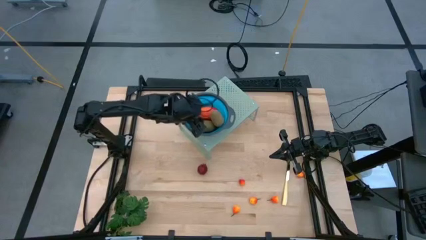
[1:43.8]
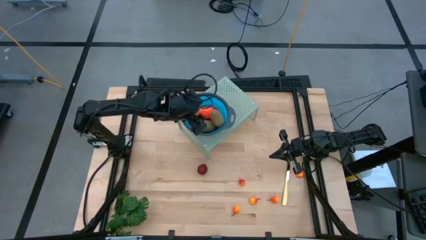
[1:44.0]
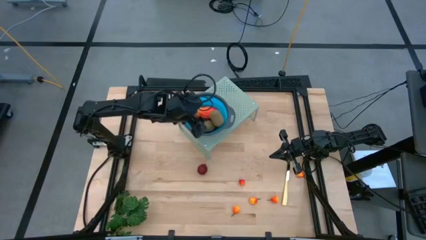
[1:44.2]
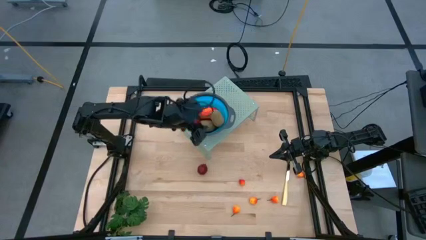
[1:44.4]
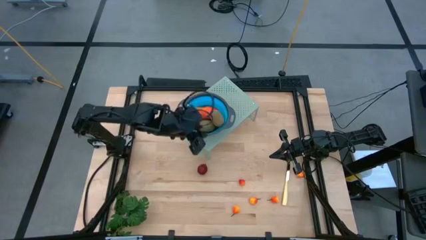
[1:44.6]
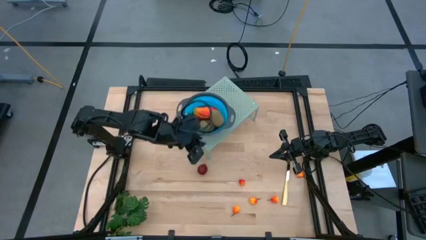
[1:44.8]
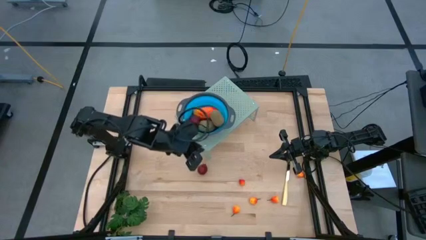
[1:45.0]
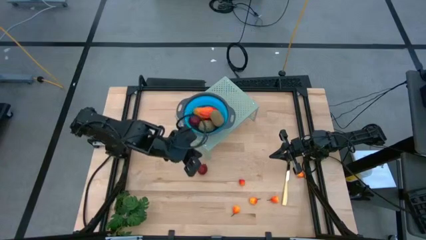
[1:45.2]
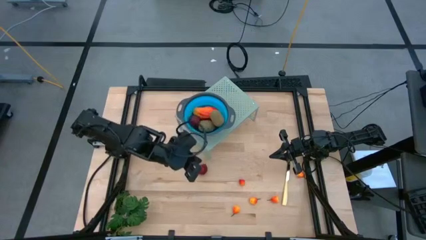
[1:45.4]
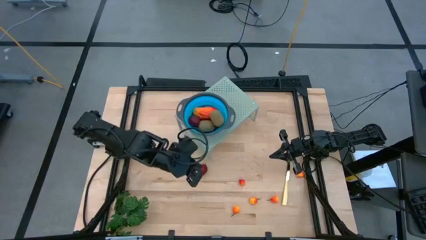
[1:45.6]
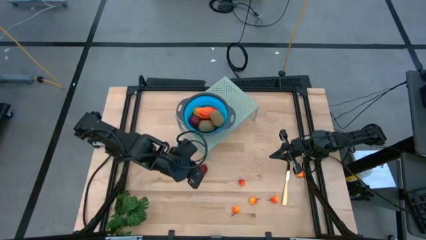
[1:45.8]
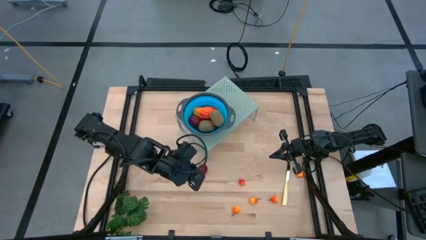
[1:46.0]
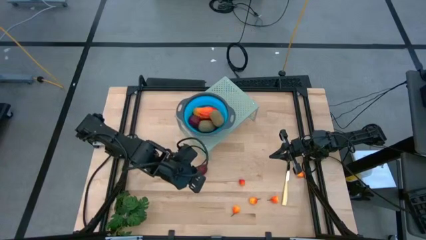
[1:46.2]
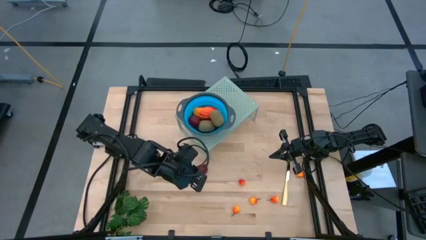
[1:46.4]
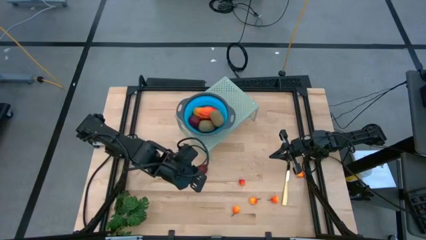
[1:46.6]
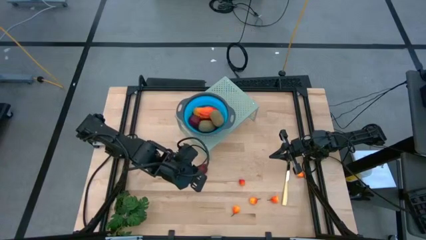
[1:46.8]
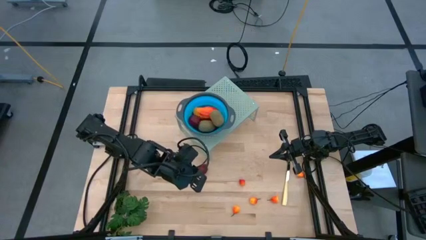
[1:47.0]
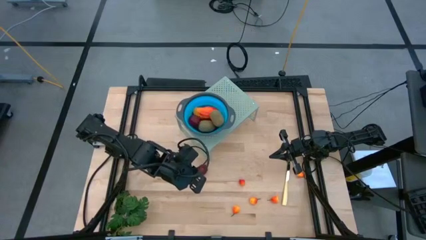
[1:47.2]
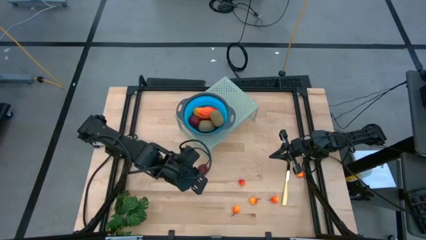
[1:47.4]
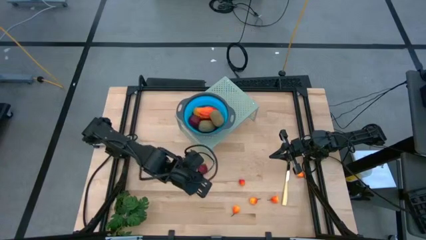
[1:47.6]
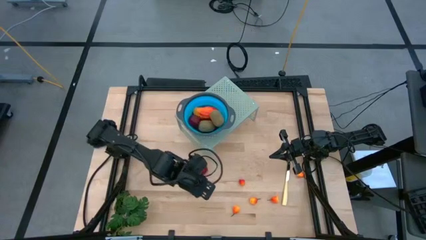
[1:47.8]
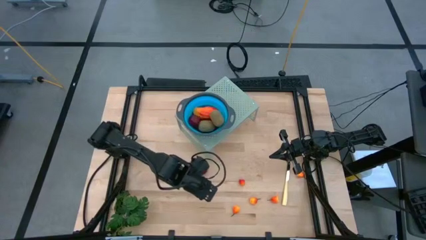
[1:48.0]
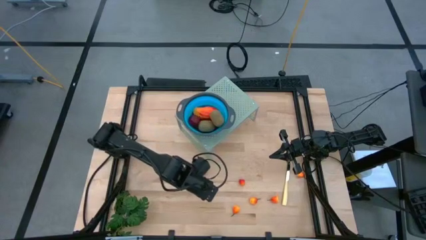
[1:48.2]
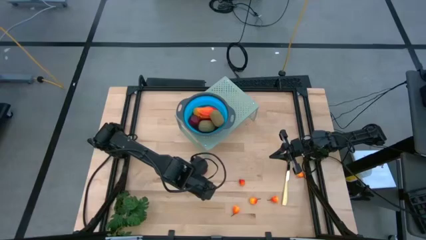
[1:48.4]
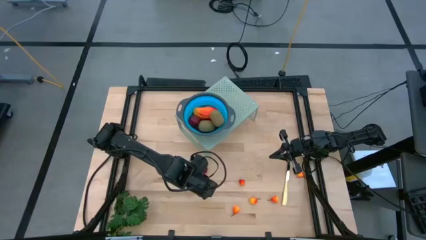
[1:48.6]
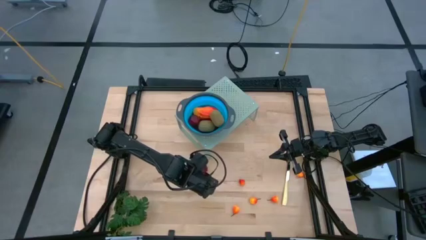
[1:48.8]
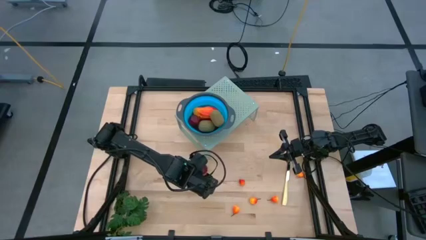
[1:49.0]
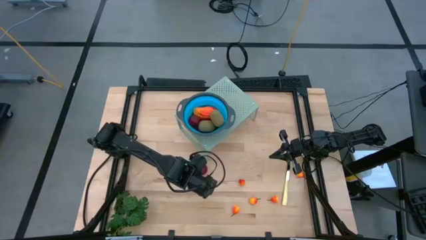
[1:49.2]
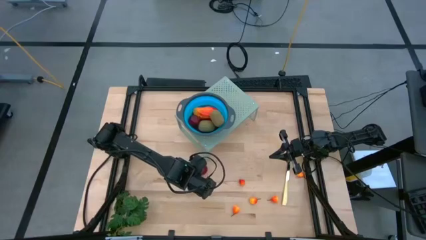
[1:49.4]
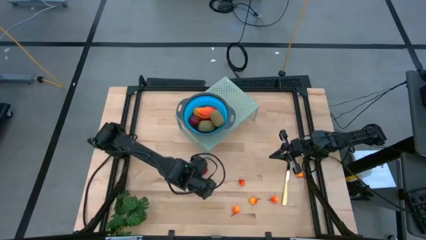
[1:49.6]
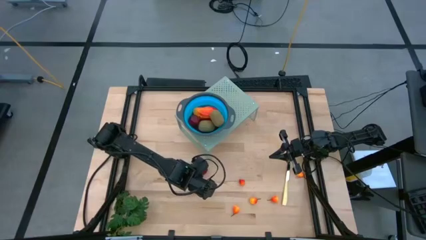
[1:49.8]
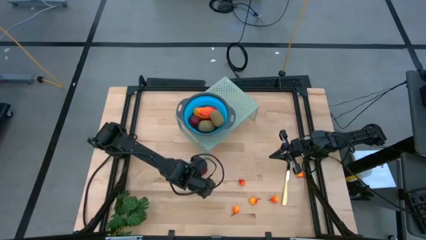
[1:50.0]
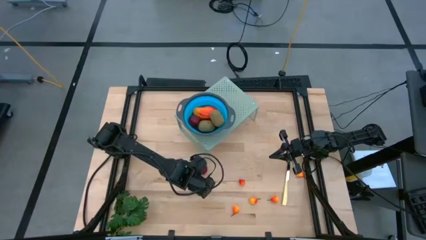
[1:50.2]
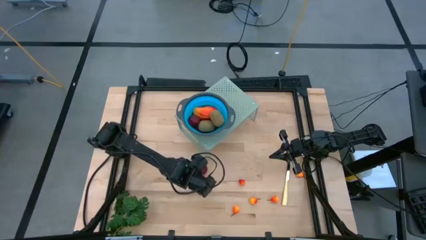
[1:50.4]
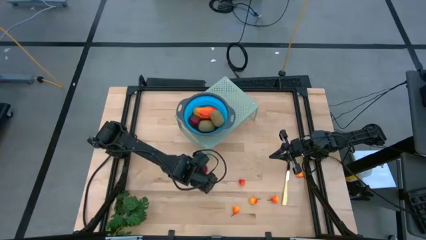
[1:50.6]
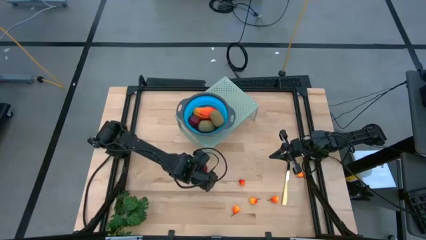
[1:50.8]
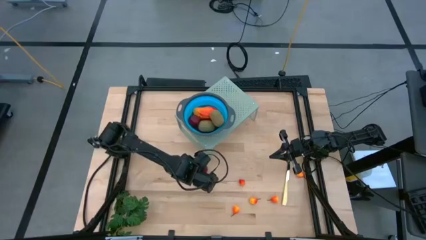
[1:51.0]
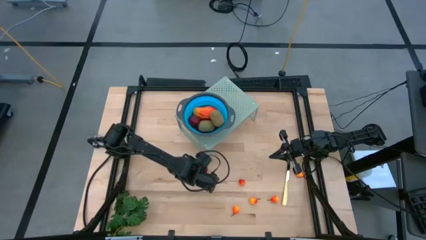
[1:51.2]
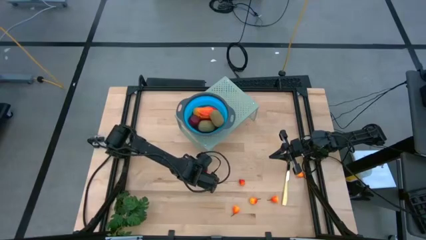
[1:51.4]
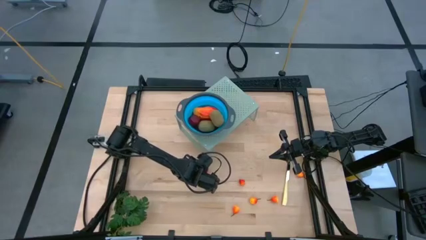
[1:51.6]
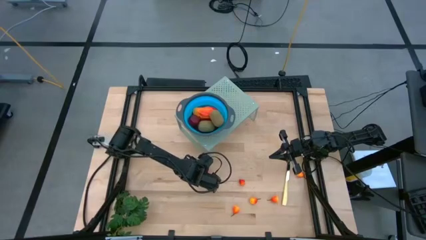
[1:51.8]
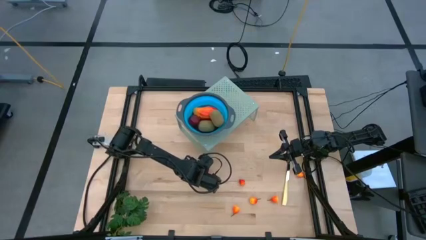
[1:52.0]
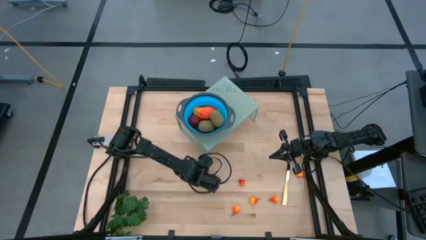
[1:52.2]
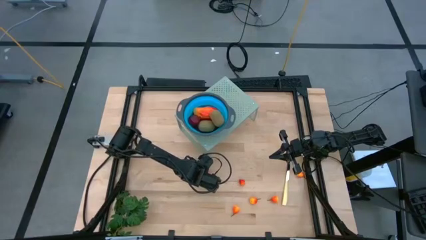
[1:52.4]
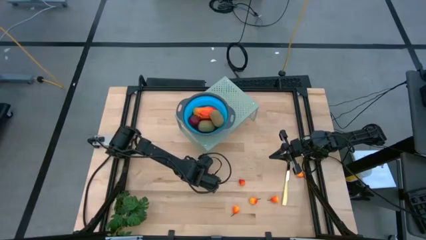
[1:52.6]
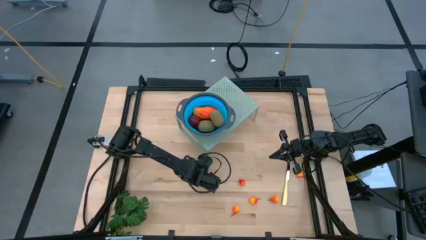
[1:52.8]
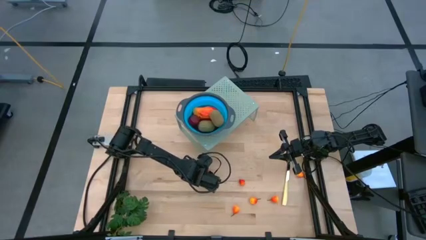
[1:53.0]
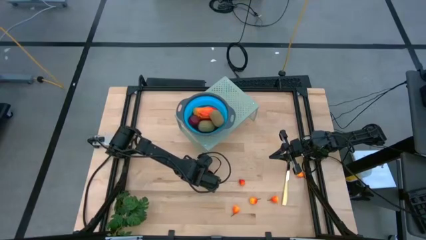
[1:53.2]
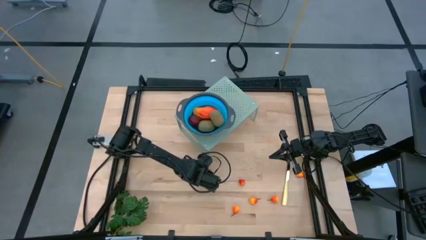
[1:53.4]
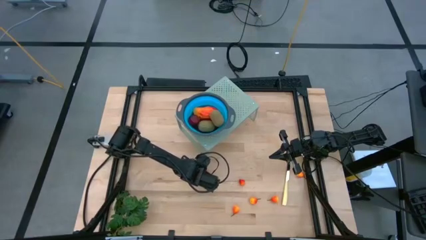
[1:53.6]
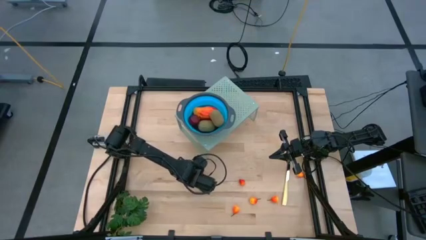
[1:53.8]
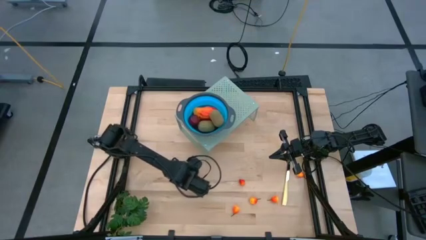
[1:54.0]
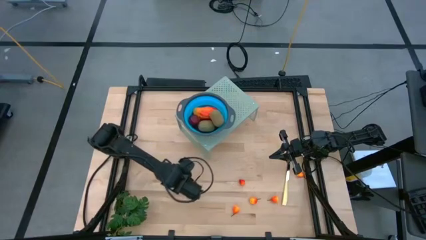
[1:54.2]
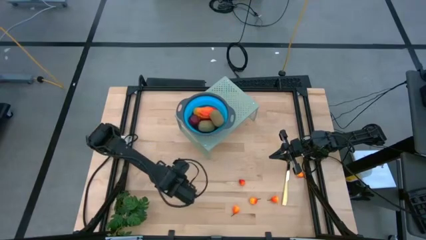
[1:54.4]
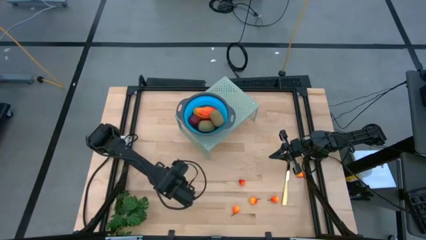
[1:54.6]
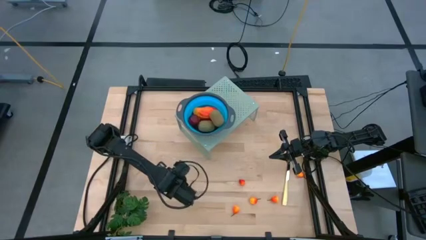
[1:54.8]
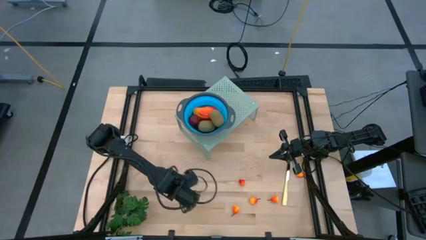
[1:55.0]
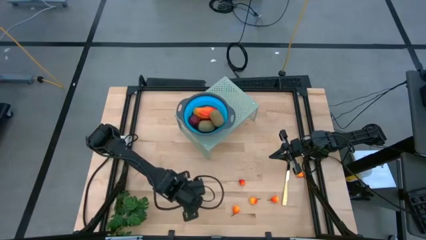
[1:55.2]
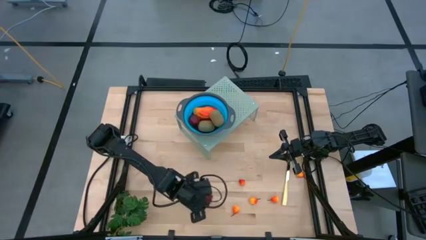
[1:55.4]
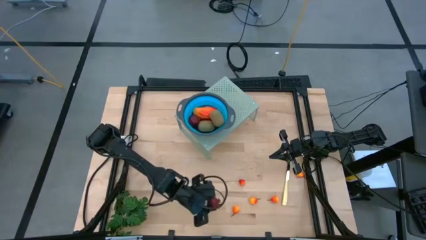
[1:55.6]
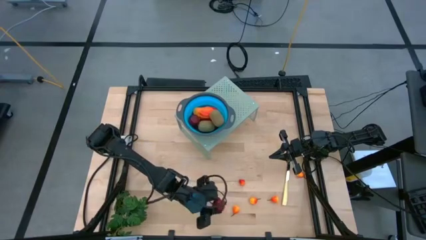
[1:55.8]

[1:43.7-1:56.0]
Task: Pick & Place Fruit
Put the pomegranate into the collapsible colander on the shelf
